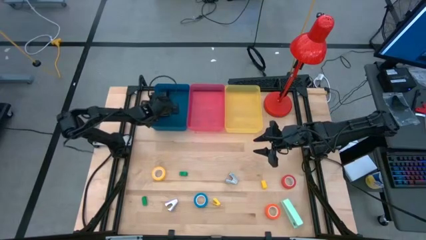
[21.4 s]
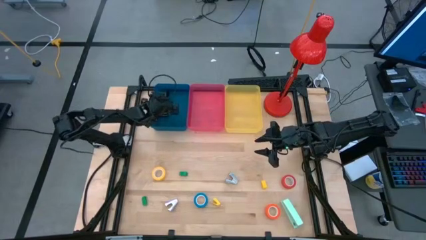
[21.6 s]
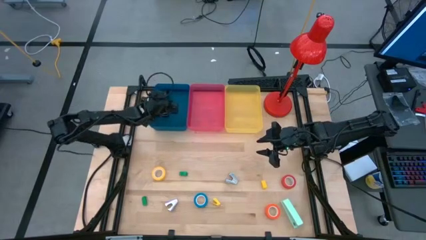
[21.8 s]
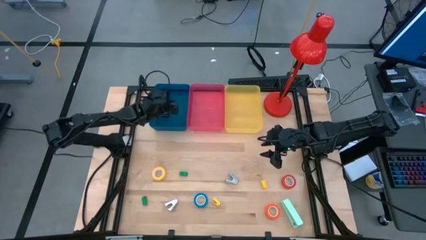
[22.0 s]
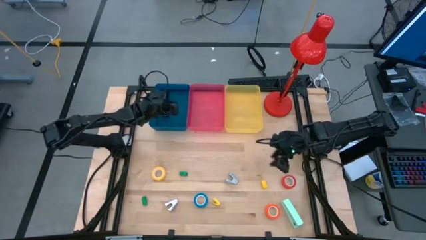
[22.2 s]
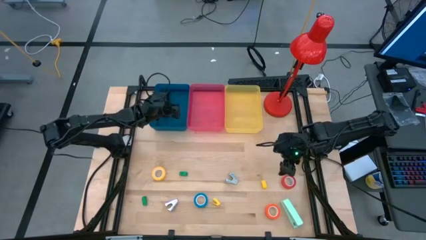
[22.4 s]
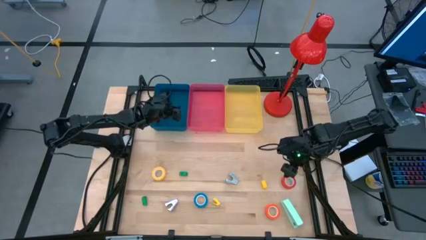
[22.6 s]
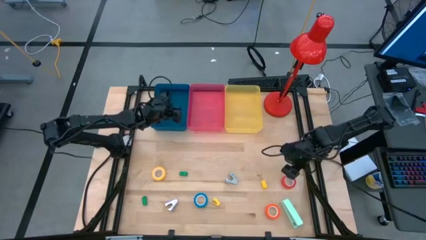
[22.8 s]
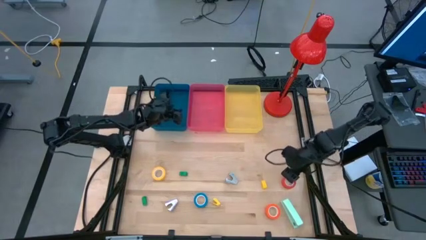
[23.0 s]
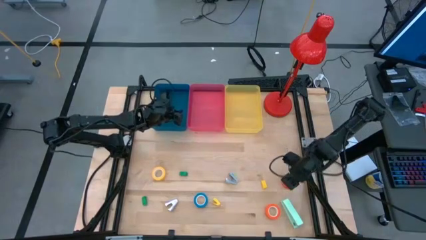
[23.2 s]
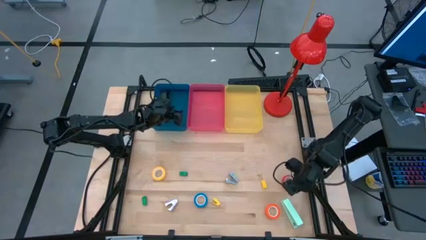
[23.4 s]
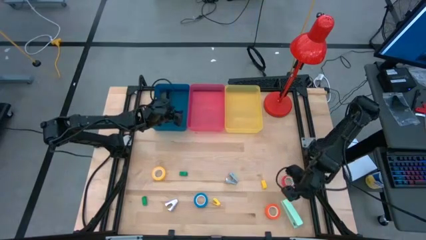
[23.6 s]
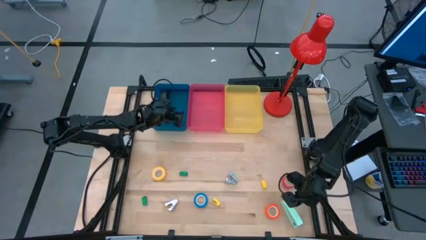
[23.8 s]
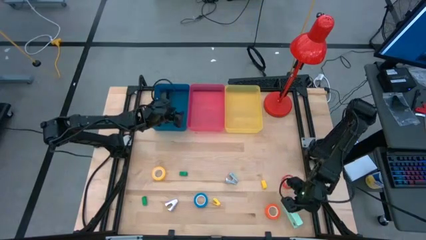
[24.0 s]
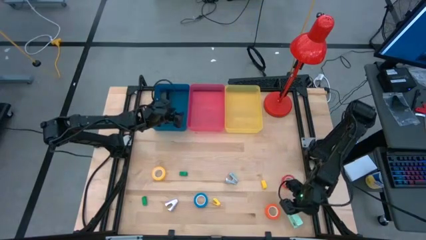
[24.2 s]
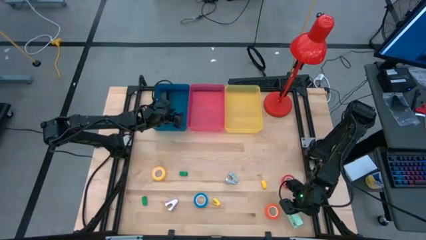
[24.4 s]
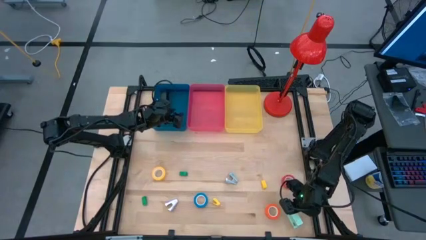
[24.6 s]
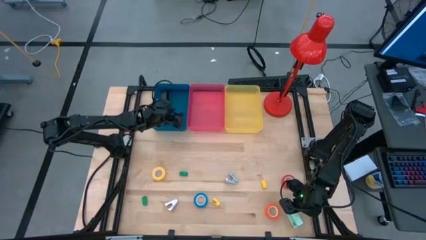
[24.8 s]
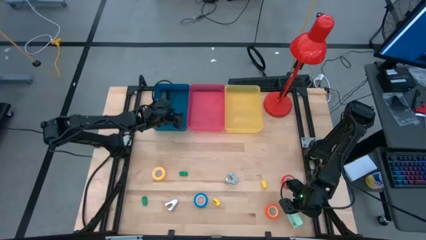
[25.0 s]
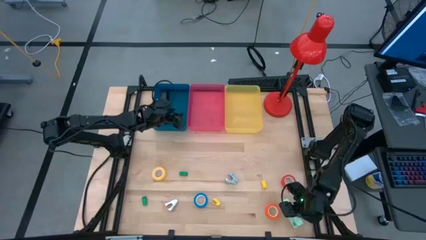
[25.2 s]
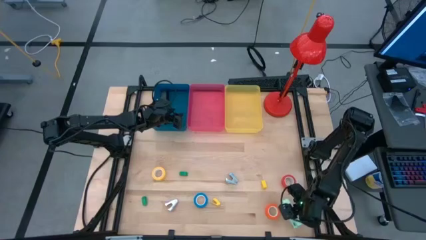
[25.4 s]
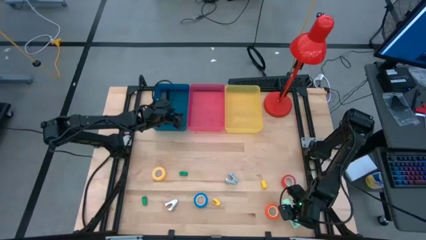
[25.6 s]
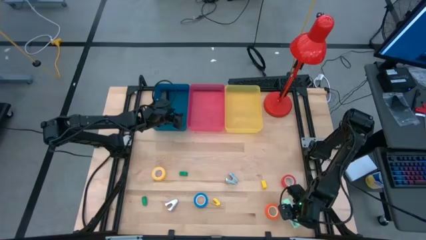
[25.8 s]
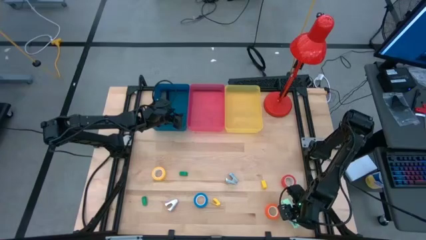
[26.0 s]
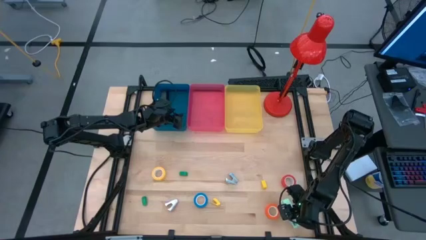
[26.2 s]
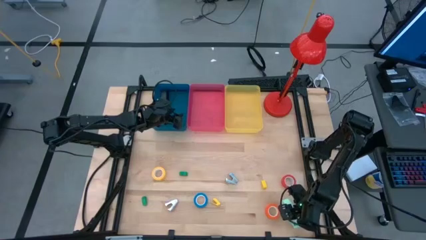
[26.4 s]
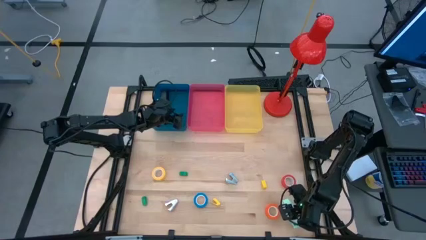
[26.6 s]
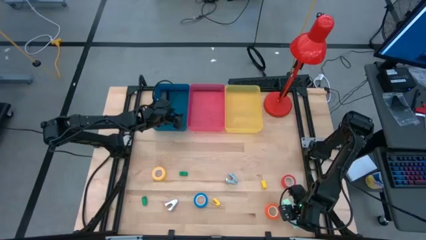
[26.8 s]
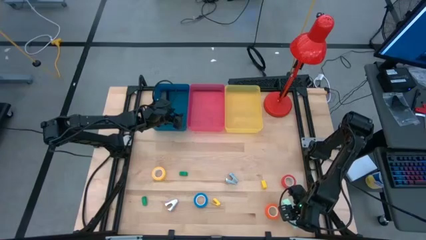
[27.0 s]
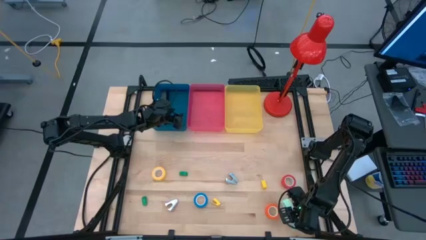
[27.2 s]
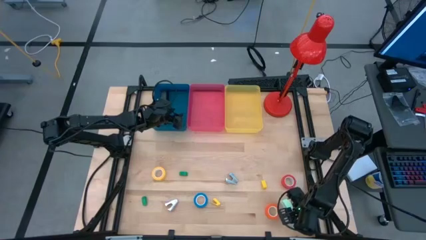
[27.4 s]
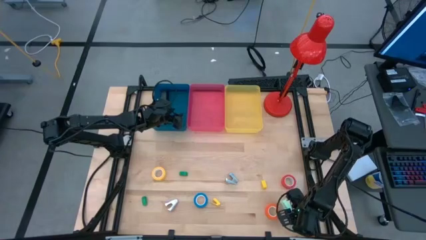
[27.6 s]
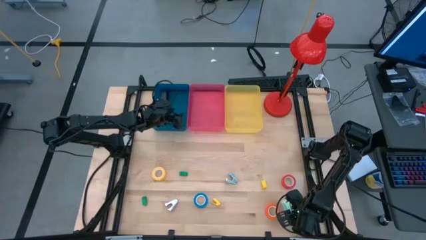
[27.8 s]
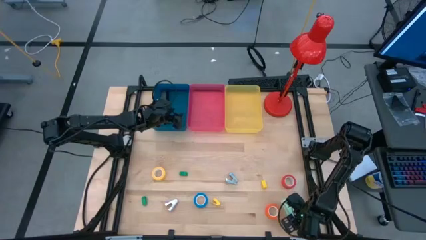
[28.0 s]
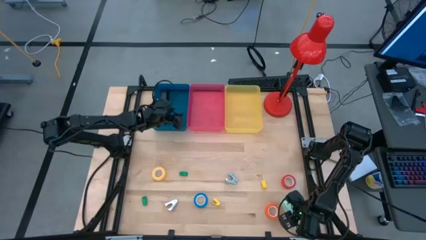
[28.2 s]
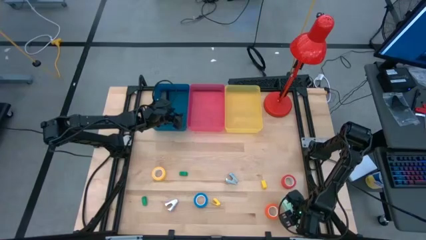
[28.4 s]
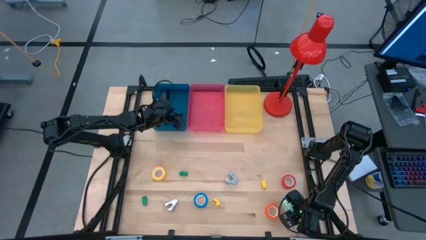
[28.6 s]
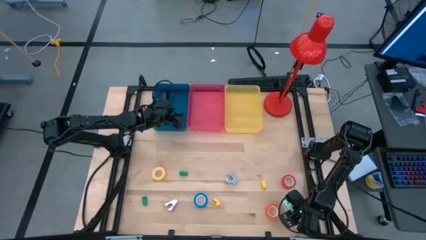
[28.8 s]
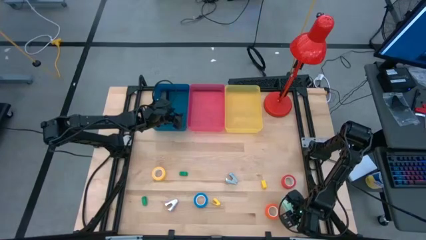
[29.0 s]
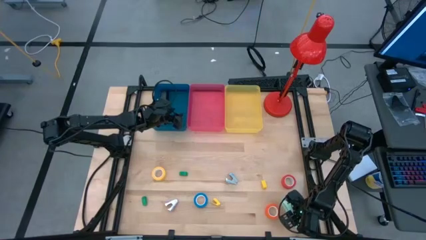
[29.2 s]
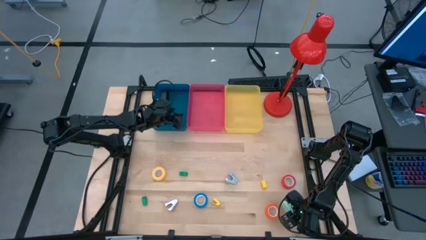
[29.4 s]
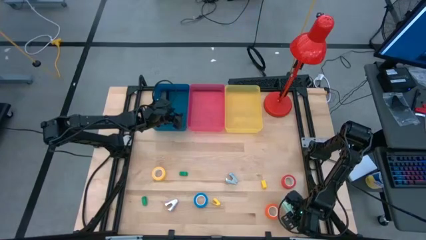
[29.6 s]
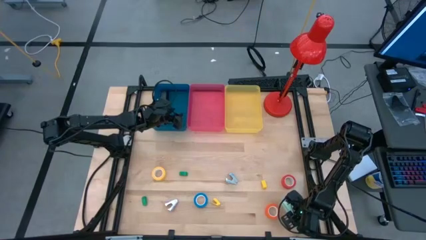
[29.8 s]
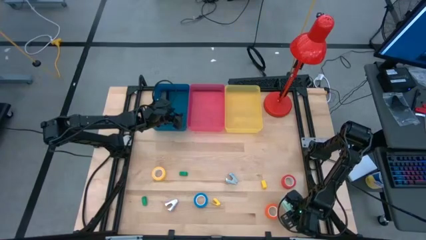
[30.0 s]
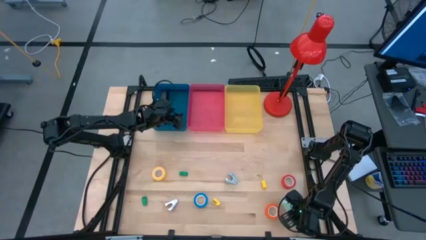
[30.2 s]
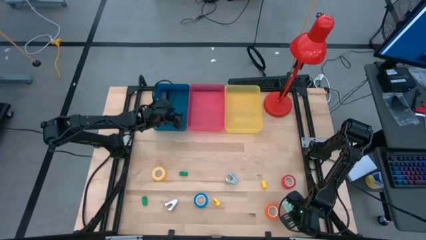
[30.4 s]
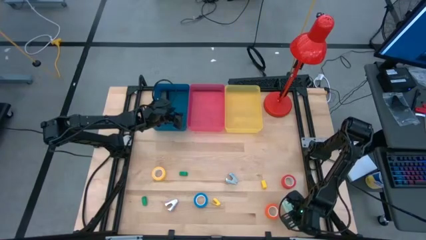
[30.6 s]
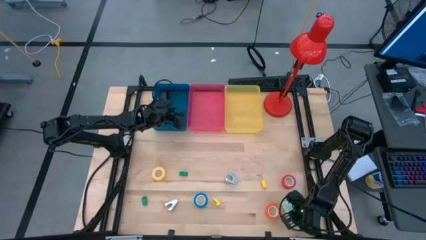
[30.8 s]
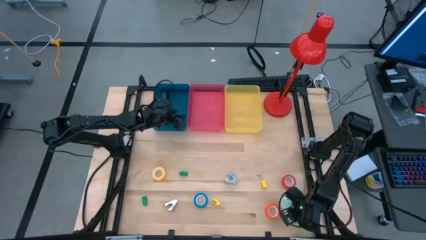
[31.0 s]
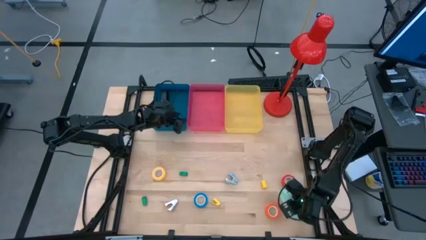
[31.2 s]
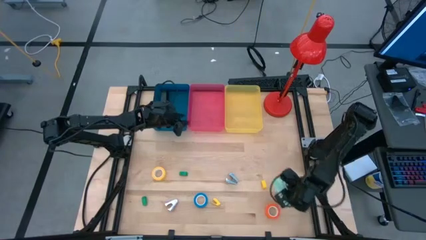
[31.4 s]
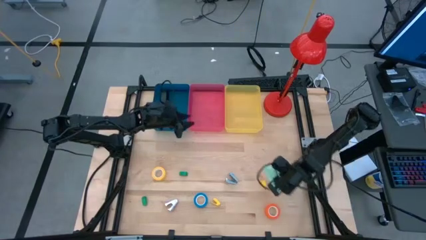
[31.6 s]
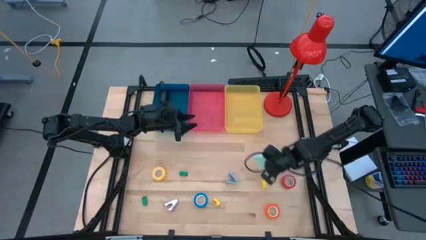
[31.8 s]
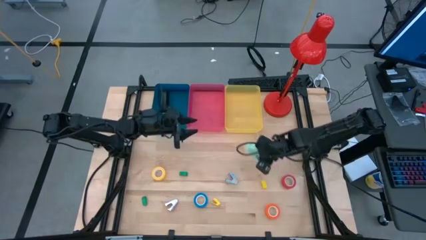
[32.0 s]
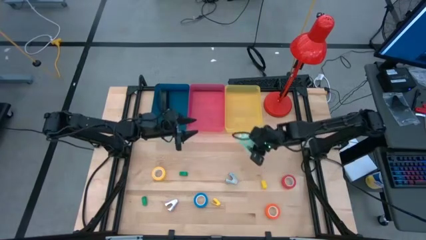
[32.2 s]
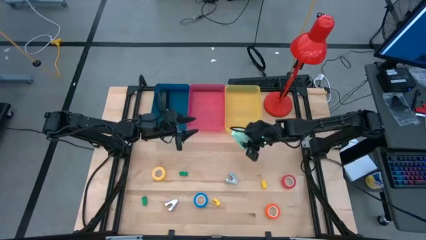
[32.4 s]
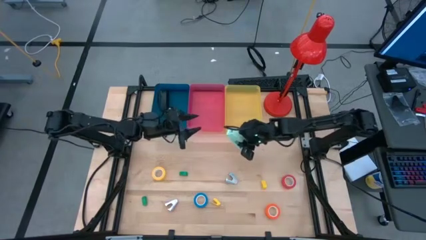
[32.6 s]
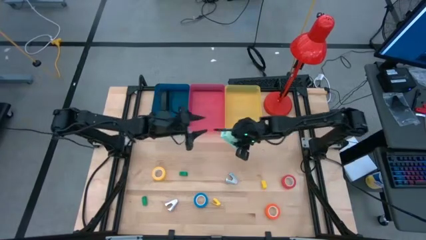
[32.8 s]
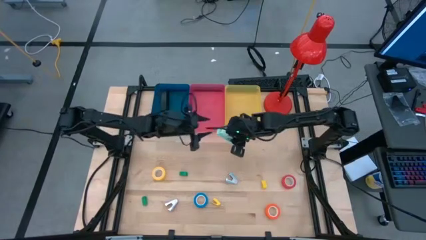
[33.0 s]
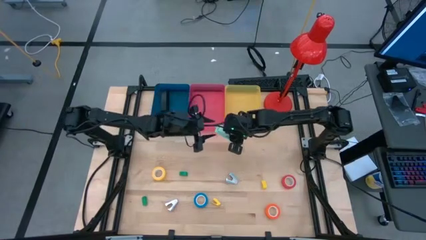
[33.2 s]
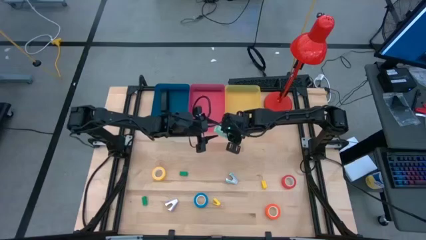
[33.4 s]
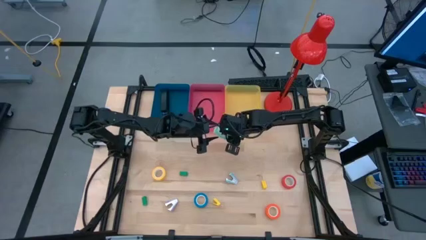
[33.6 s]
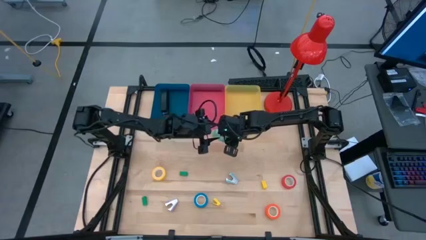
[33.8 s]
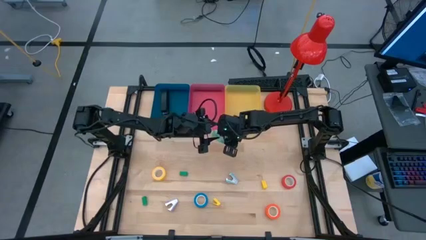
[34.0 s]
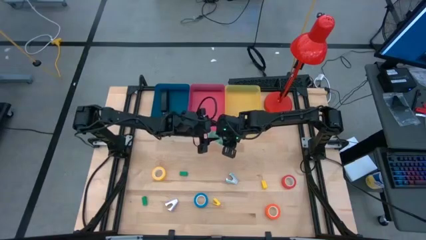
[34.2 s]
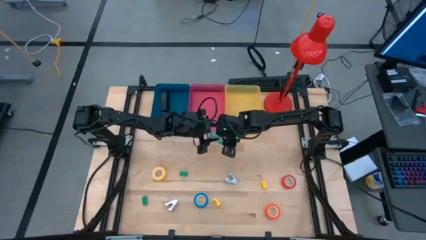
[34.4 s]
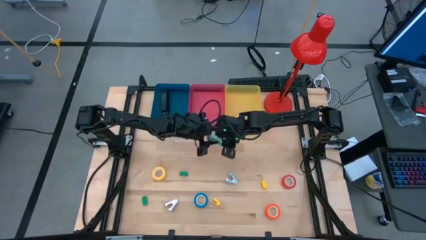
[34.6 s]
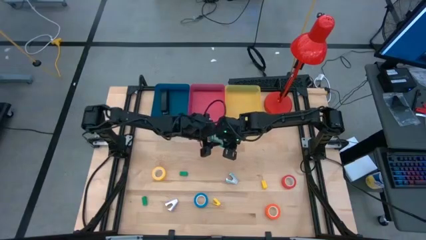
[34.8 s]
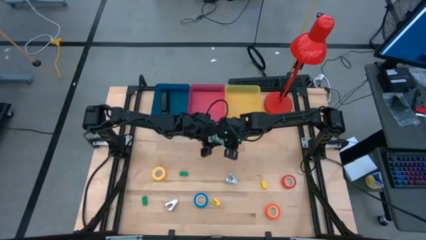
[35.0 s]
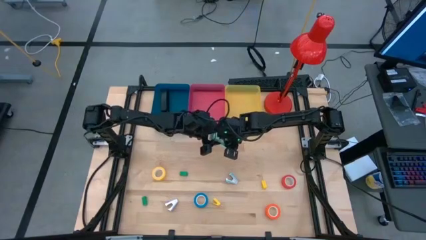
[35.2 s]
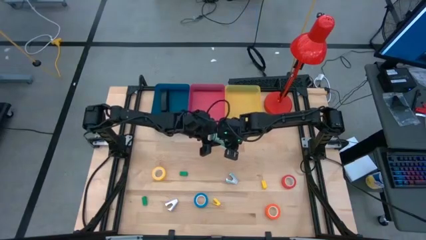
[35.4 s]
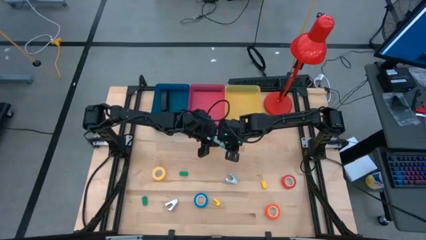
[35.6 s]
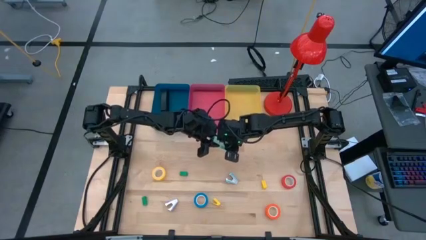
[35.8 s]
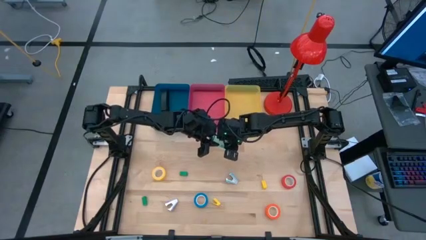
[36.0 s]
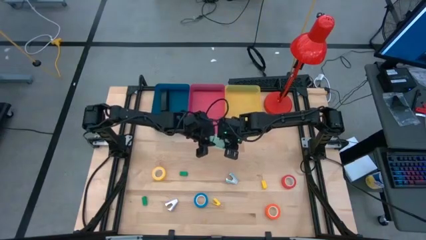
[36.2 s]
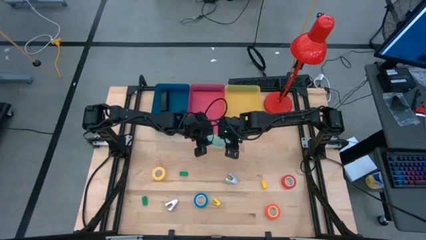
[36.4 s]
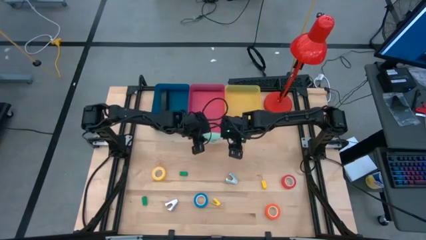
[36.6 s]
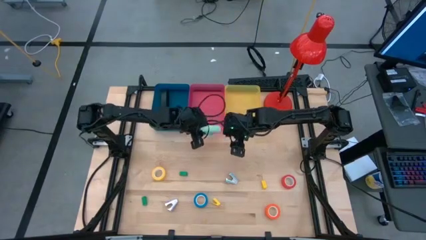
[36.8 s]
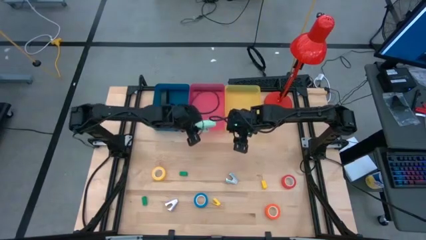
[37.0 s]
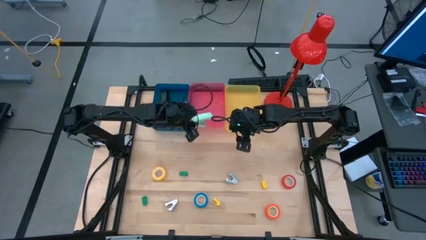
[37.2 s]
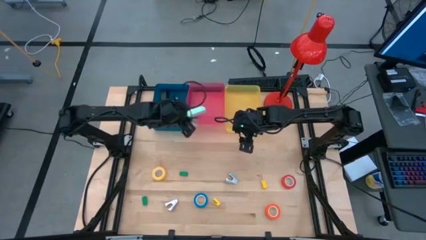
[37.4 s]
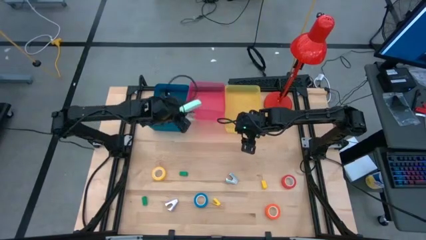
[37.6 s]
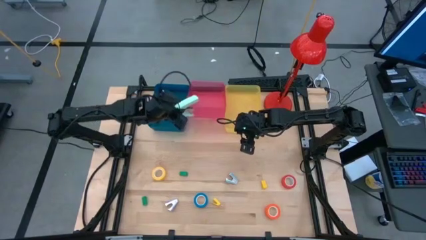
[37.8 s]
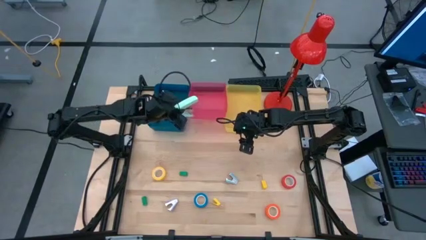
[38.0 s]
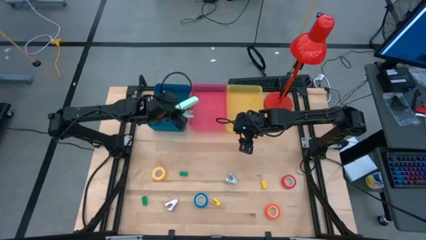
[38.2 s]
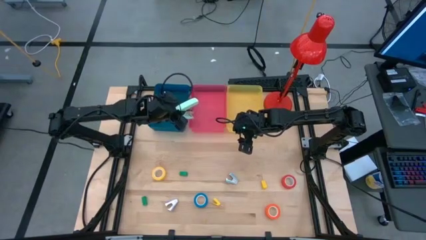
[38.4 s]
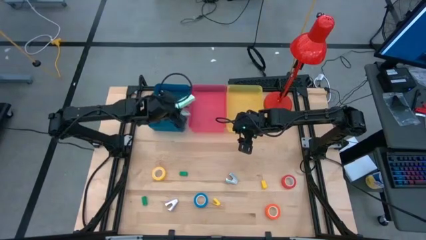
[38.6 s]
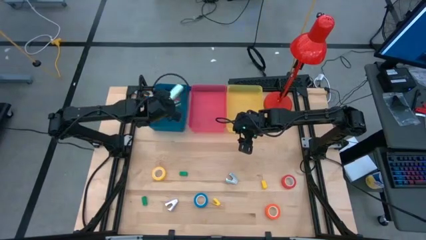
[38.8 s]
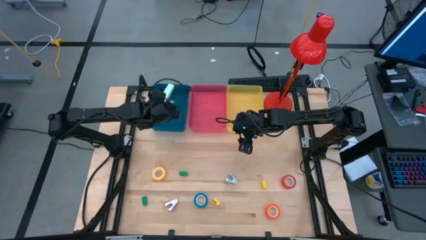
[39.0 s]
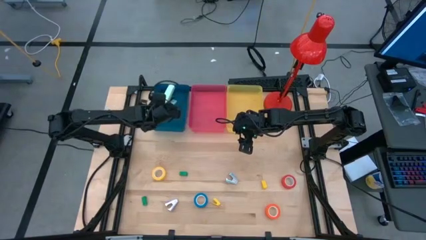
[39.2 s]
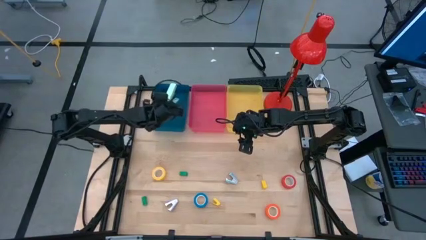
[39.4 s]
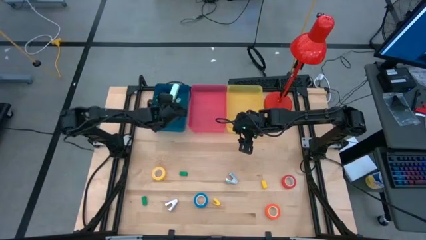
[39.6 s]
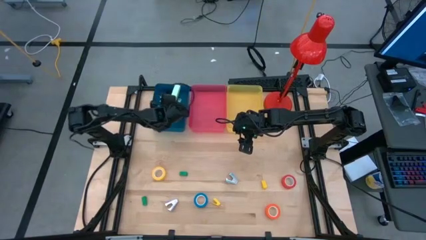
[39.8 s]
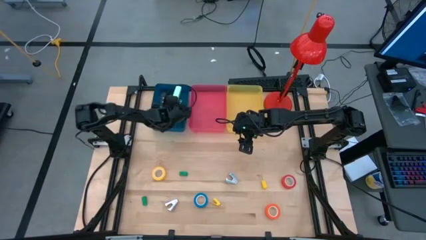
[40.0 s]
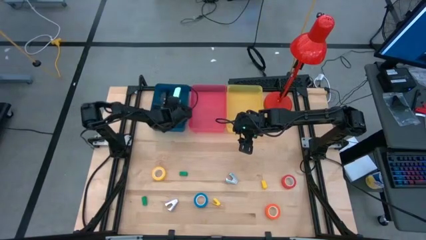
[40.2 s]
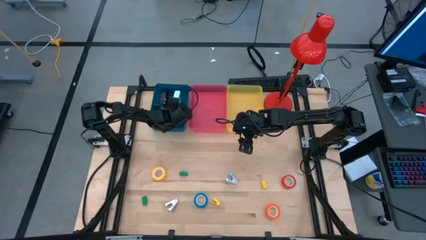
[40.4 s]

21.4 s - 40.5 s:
Task: Pick and place Stapler, Stapler remover, tape
Put the light blue stapler into the blue bin
